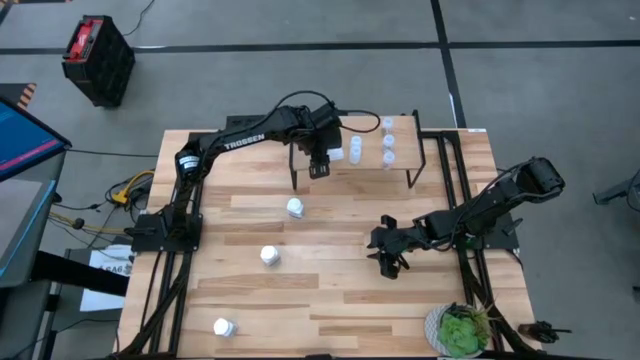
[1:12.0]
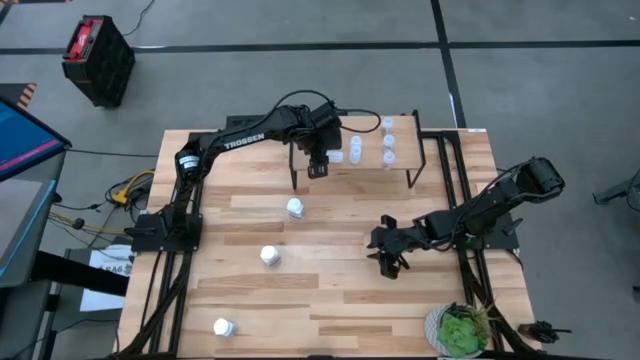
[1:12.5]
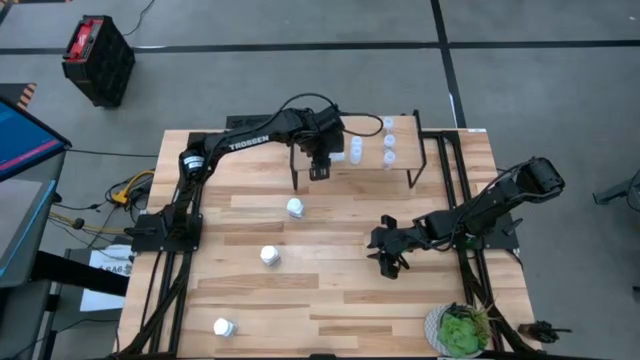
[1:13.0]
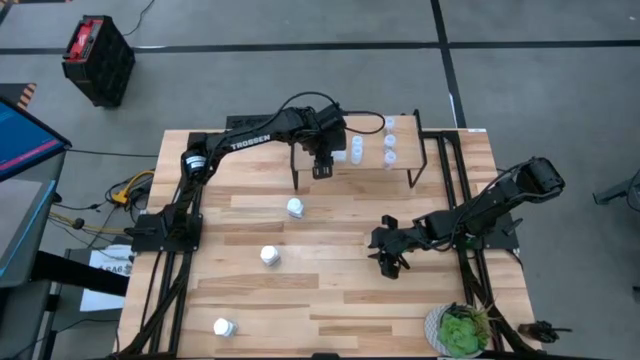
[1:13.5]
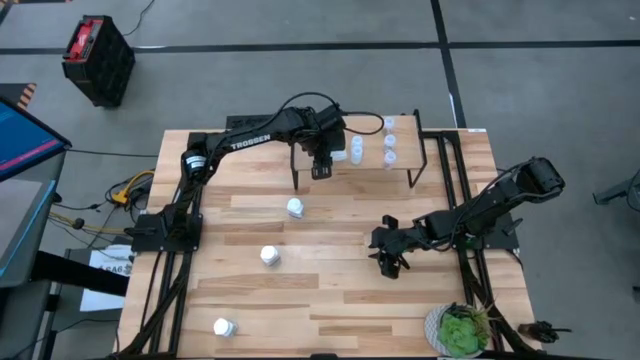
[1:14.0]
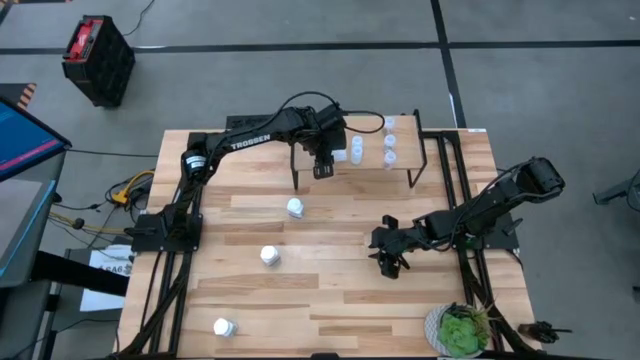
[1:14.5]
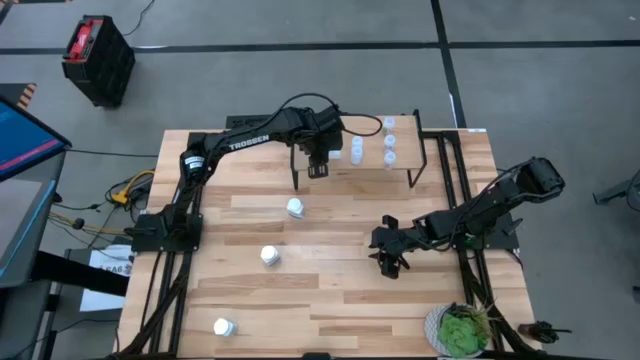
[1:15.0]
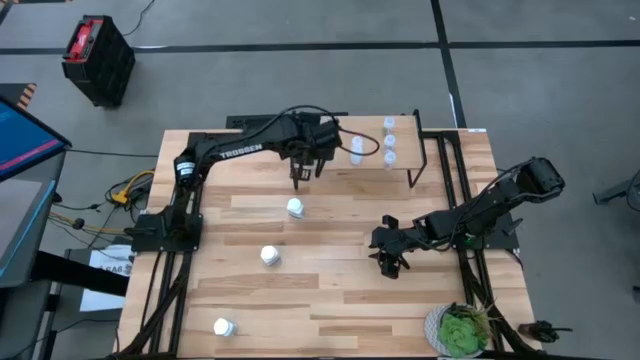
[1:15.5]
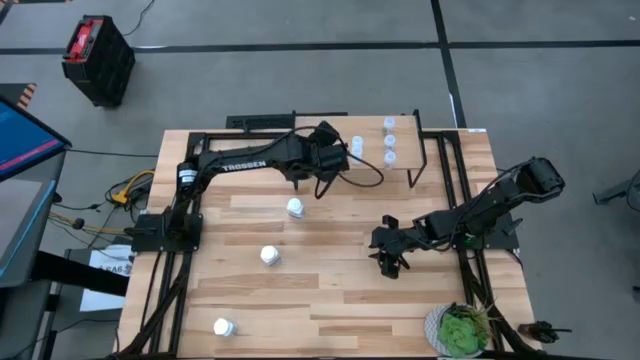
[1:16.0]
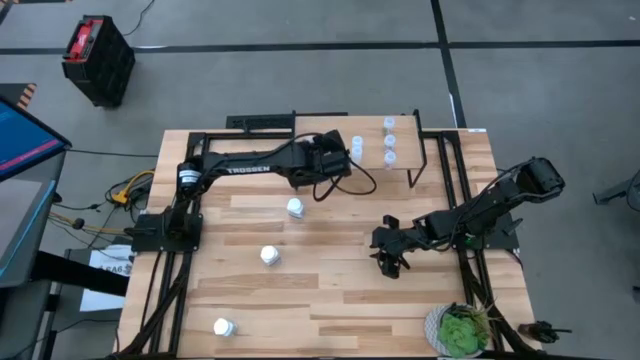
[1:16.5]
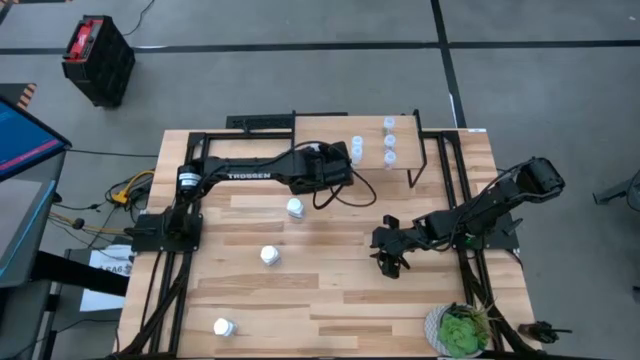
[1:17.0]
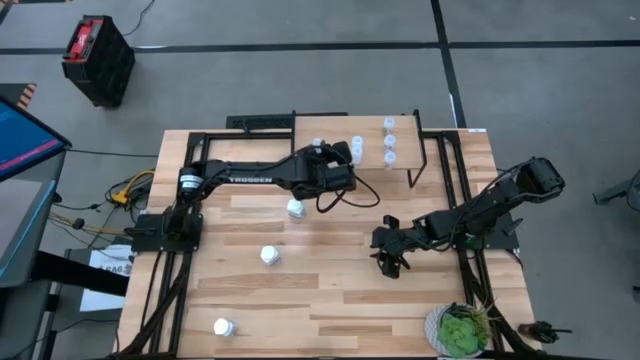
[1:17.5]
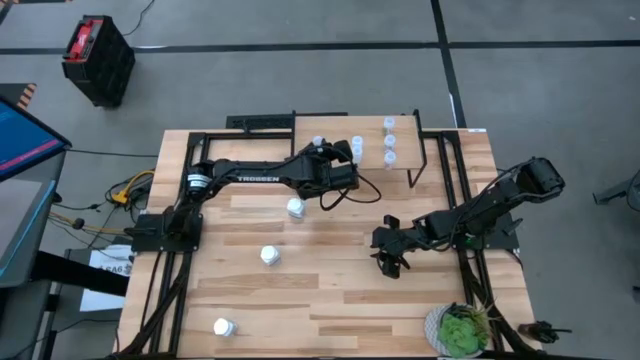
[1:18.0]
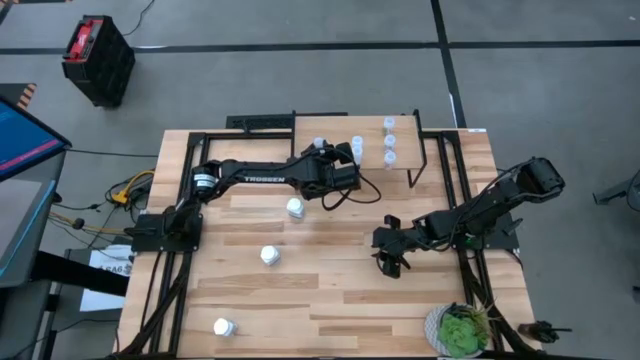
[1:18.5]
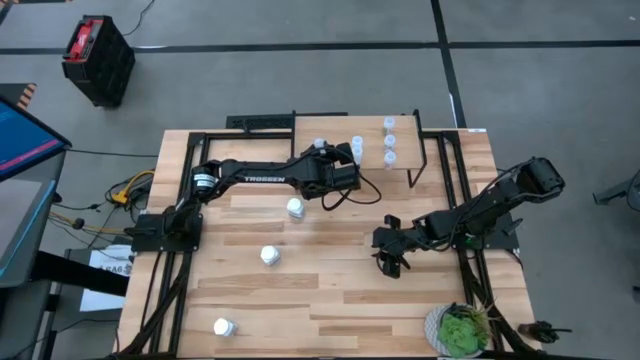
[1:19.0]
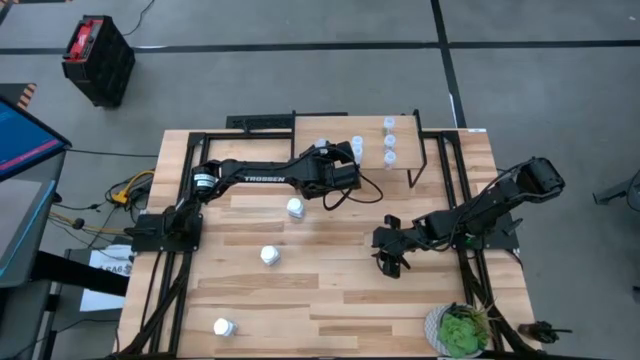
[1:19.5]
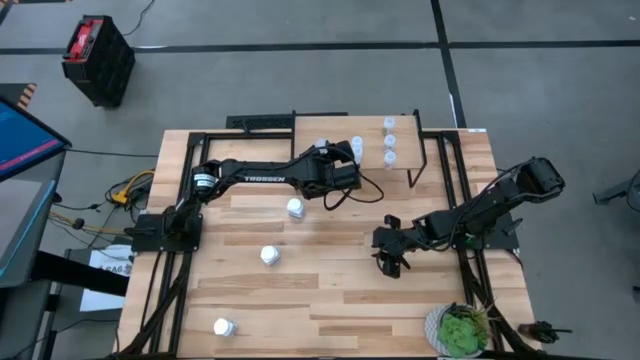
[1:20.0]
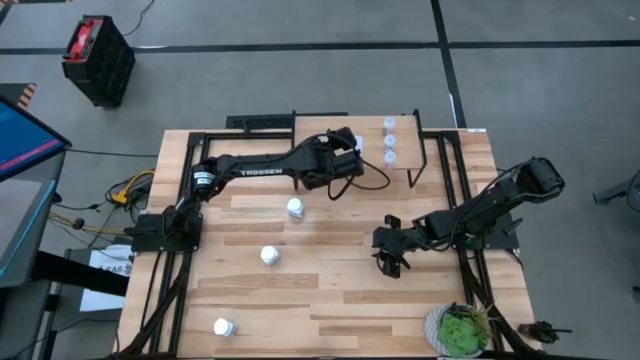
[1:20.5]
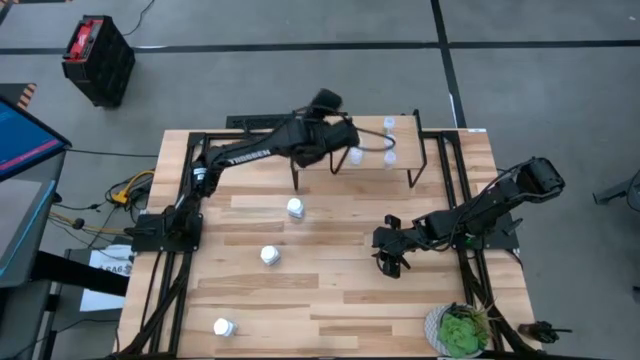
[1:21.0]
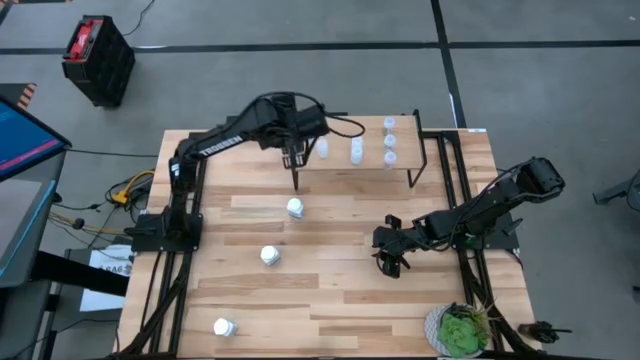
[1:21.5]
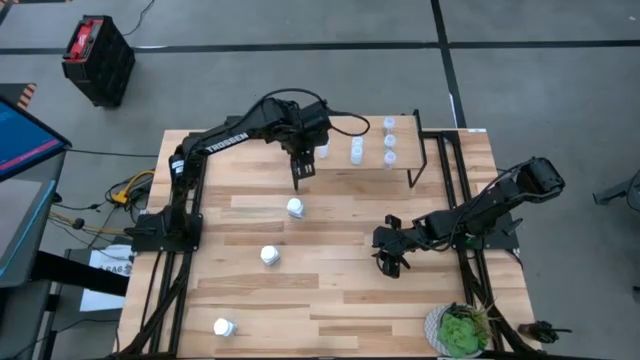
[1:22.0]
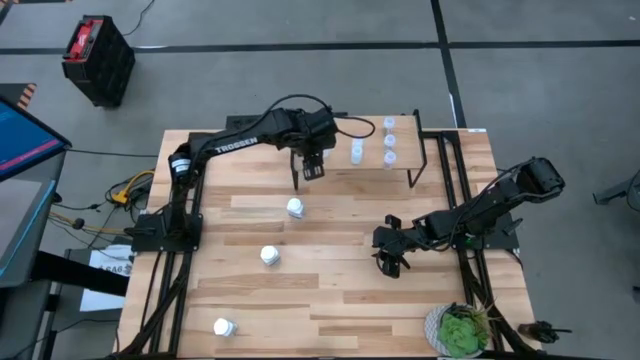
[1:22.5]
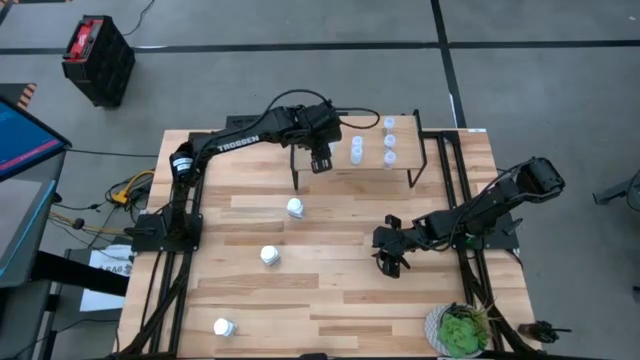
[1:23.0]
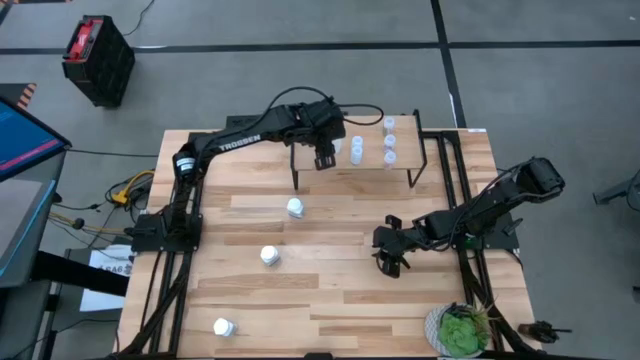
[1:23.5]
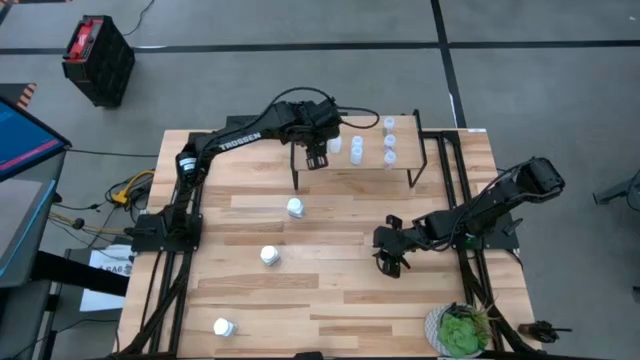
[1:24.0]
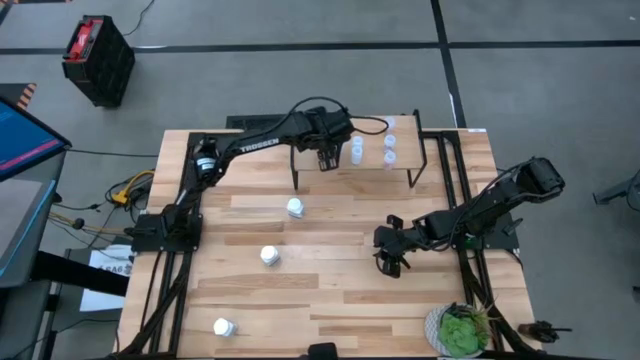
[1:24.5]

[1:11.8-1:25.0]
Task: Pick and place medicine bottles onto shelf by color
Put the translucent medicine bottle onto the middle of the shelf

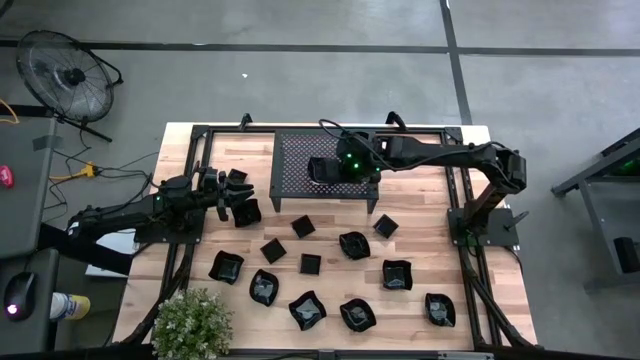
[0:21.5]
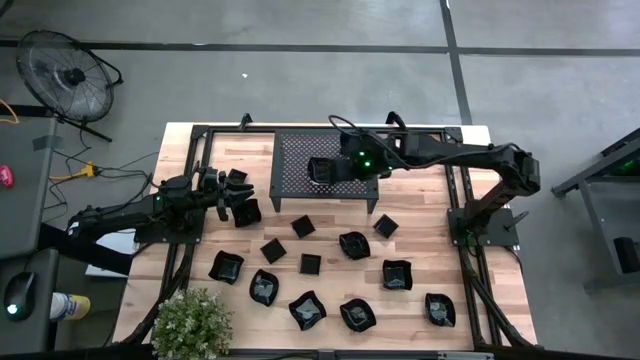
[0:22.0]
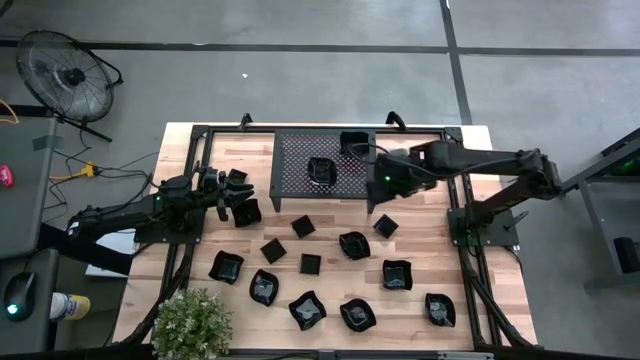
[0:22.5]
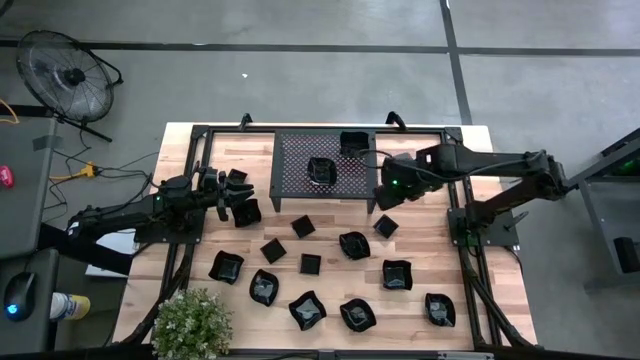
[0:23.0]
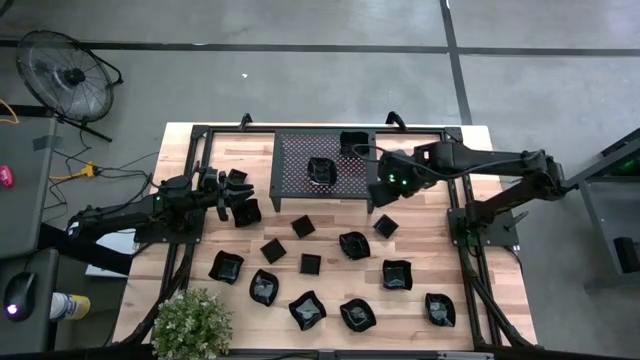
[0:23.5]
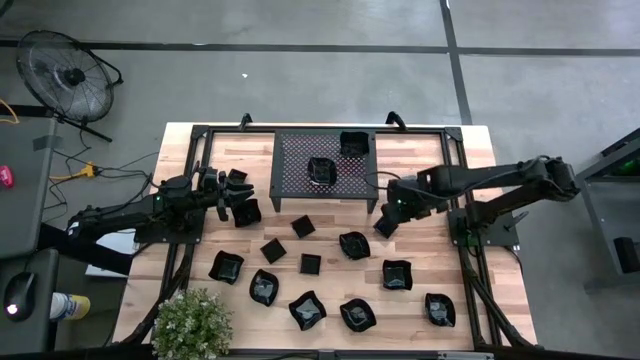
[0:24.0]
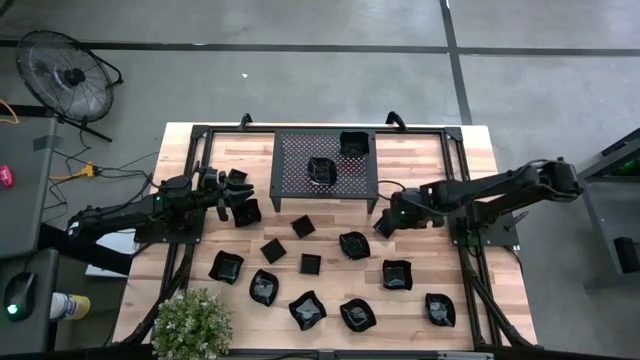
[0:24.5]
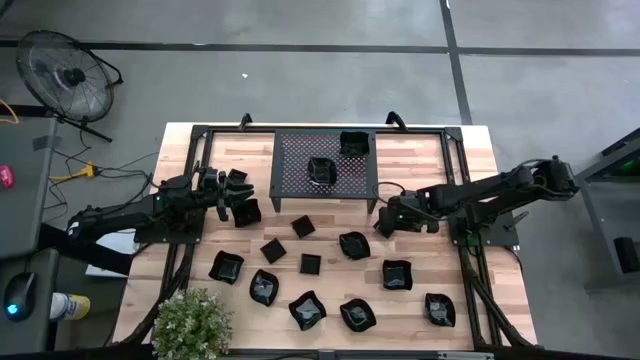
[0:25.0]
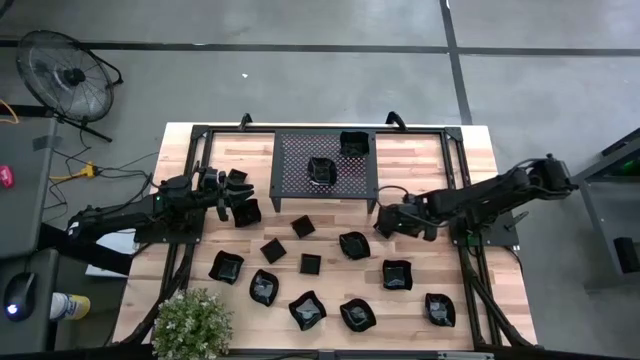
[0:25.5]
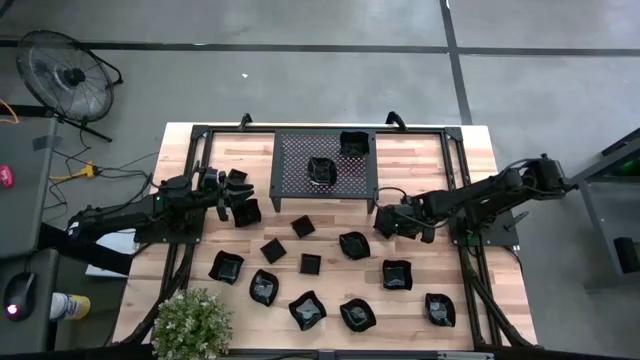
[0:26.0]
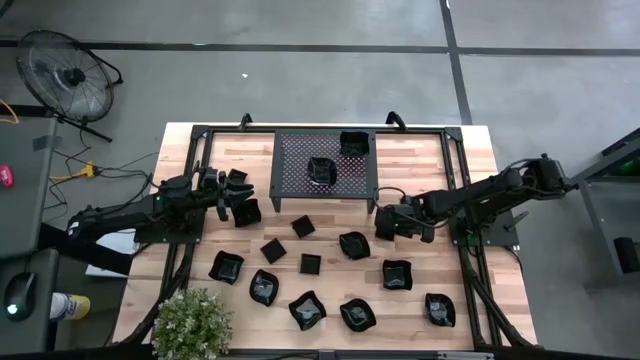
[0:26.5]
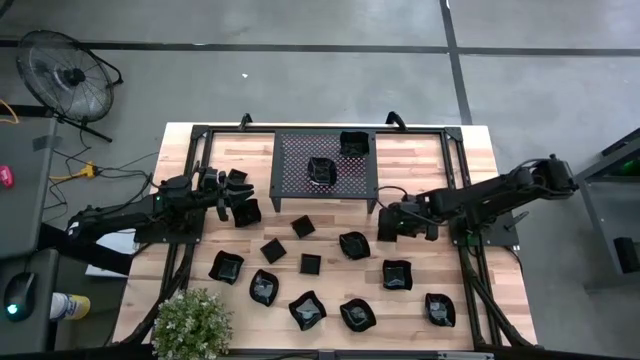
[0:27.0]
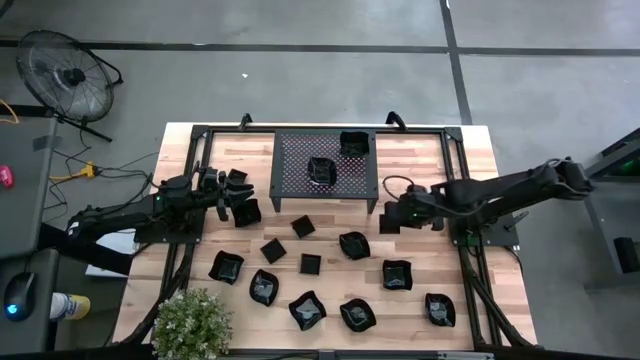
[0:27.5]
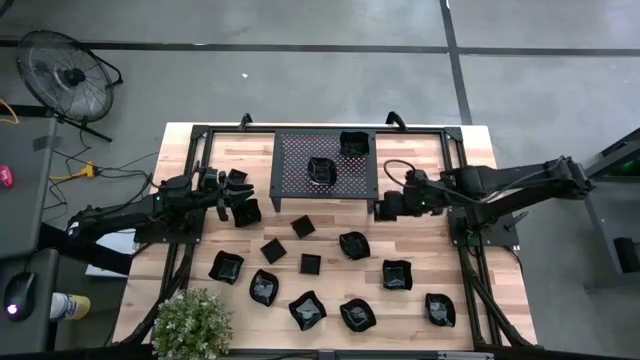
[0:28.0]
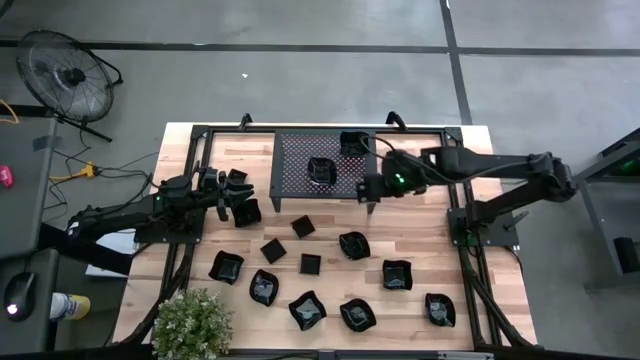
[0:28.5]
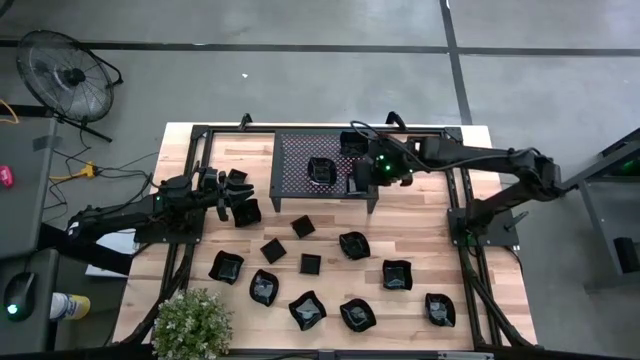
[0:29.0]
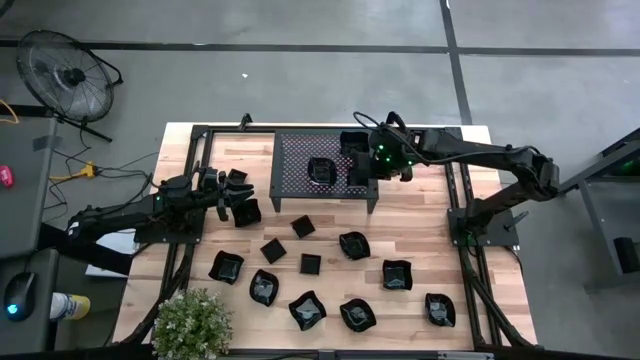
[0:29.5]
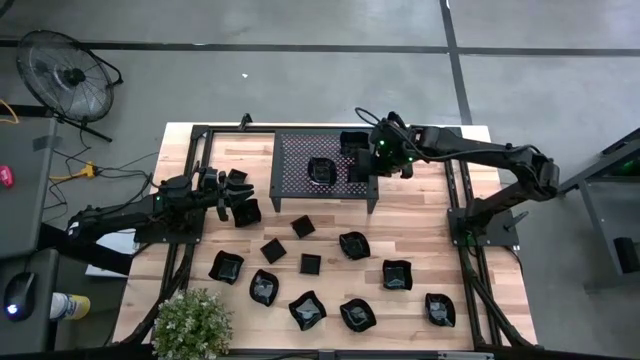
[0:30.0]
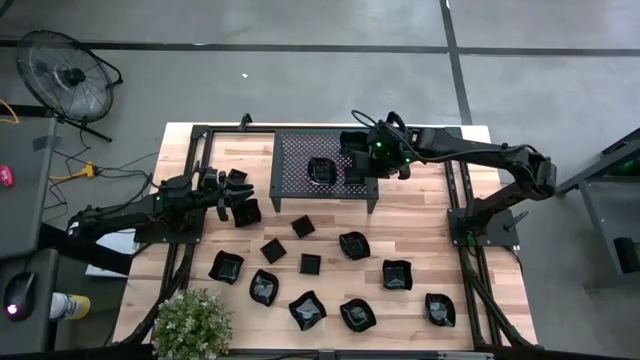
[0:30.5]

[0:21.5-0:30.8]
Task: Pick & Place Mini shaped plates
Put the black square plate on the shelf
